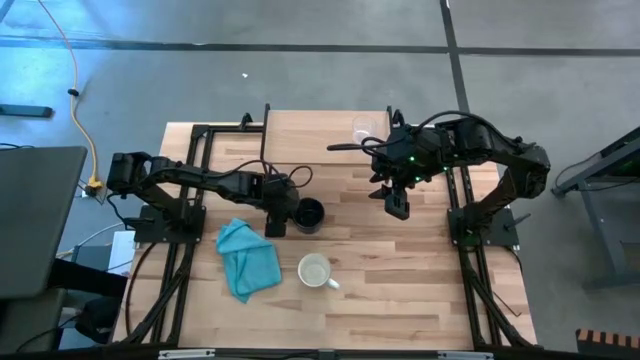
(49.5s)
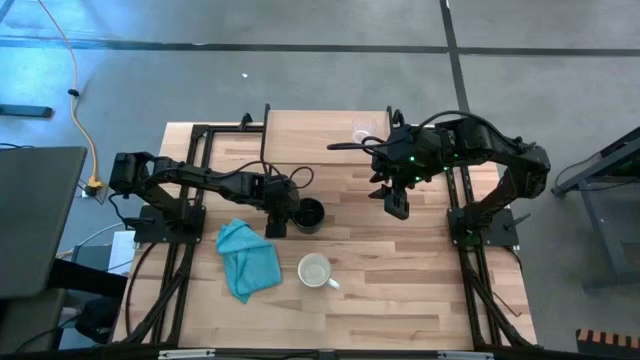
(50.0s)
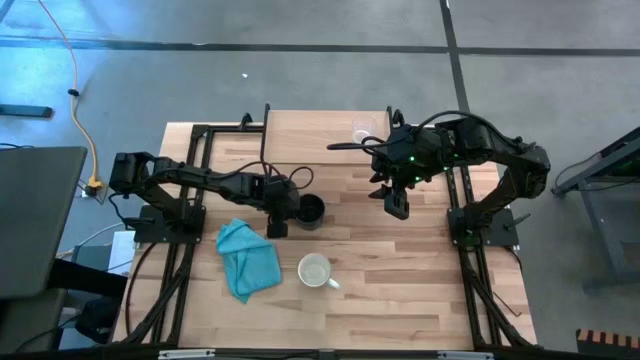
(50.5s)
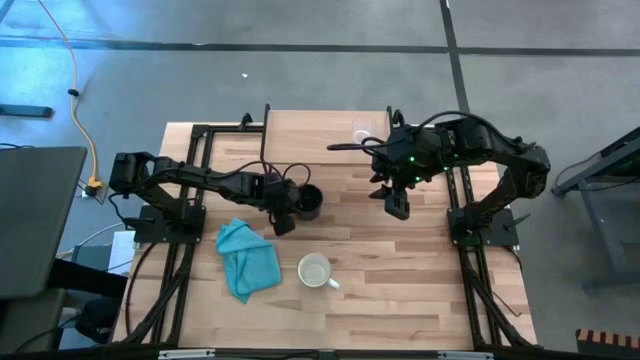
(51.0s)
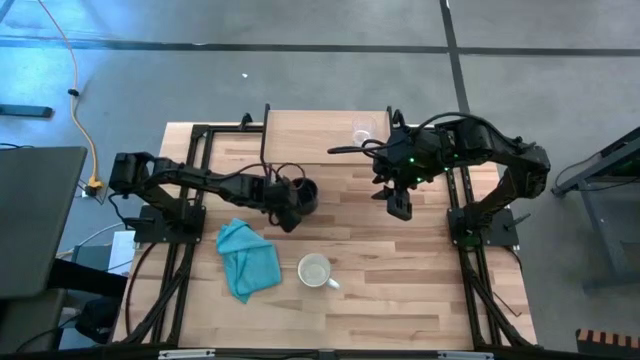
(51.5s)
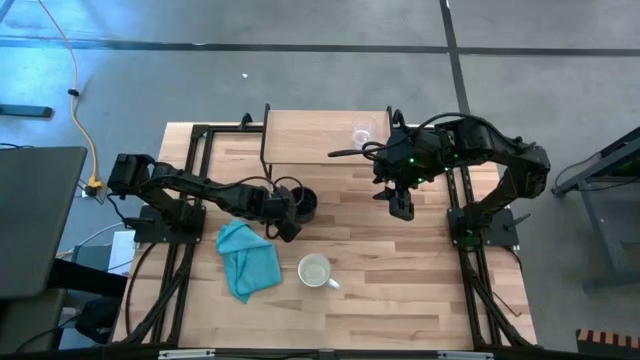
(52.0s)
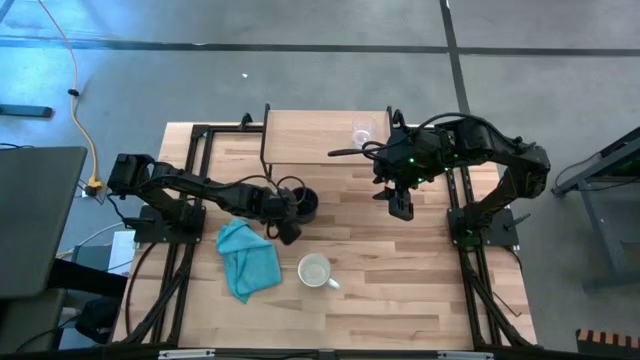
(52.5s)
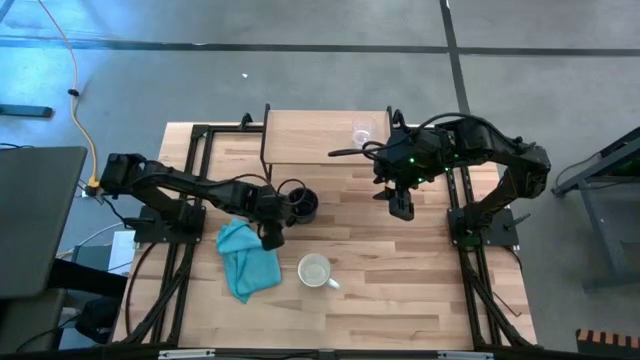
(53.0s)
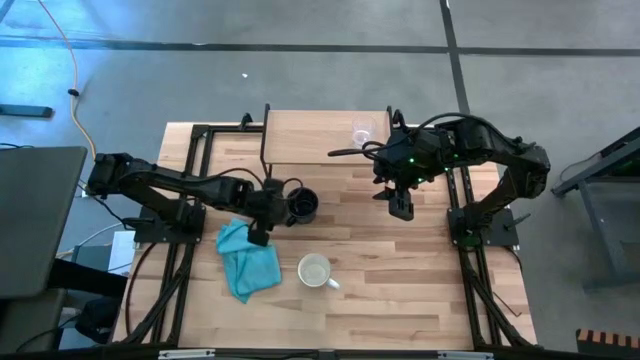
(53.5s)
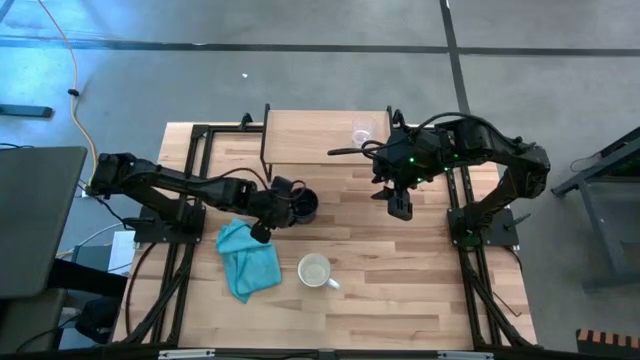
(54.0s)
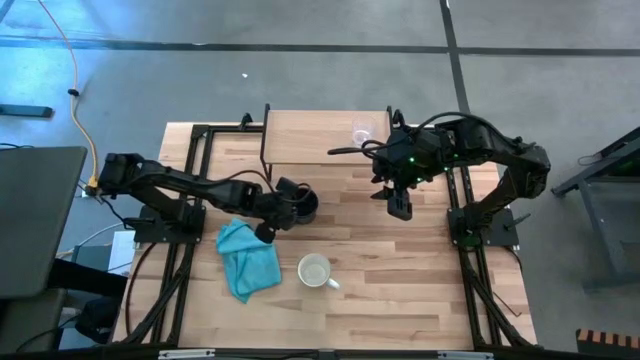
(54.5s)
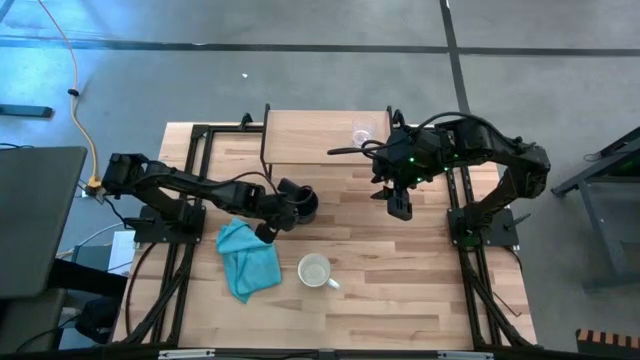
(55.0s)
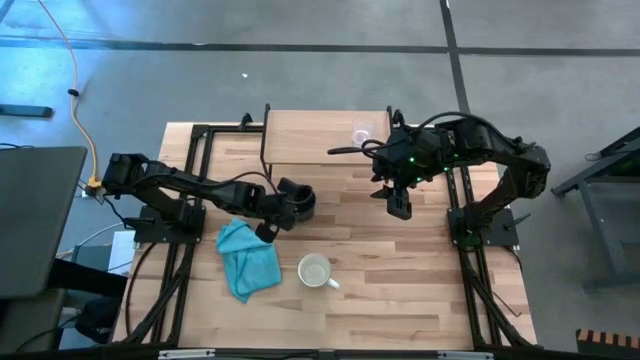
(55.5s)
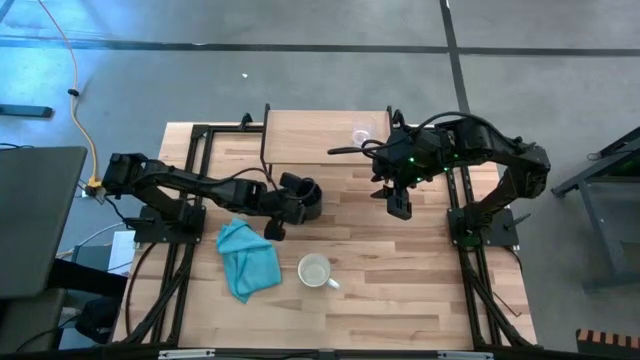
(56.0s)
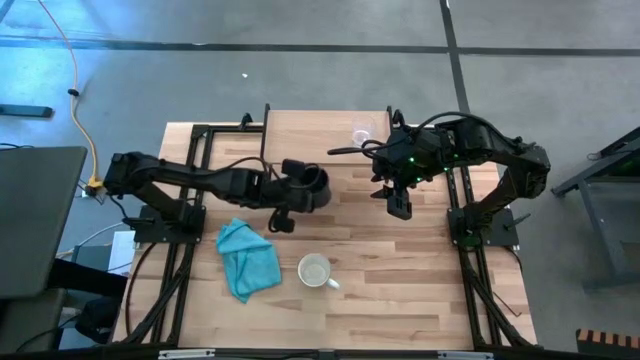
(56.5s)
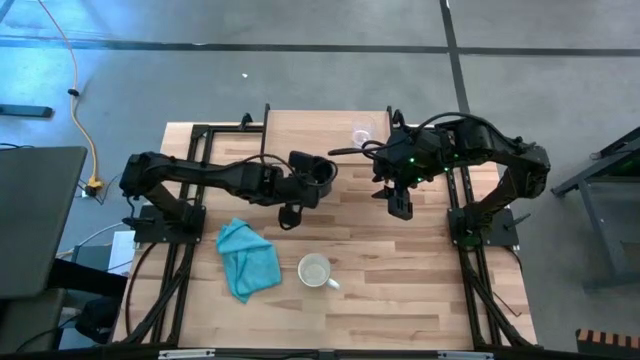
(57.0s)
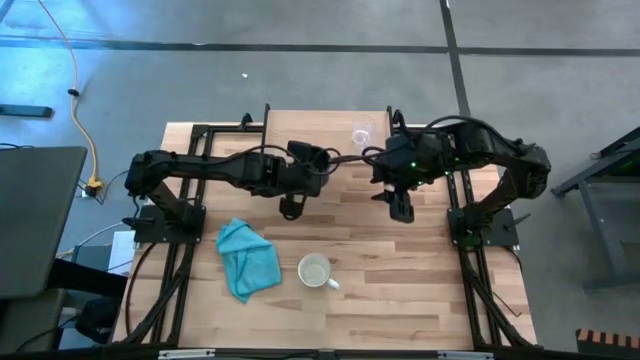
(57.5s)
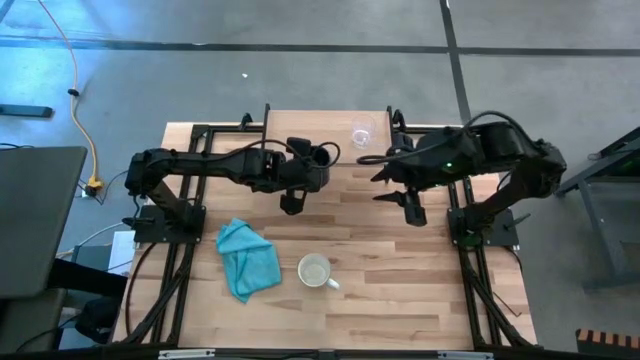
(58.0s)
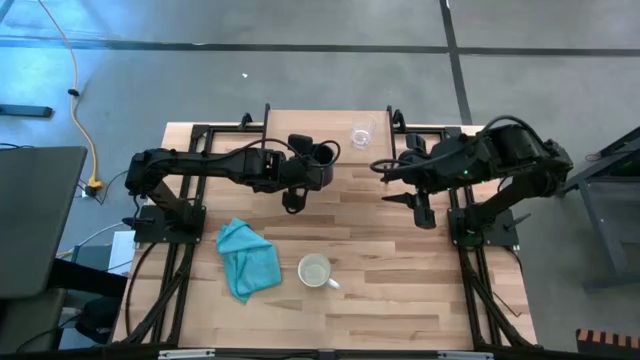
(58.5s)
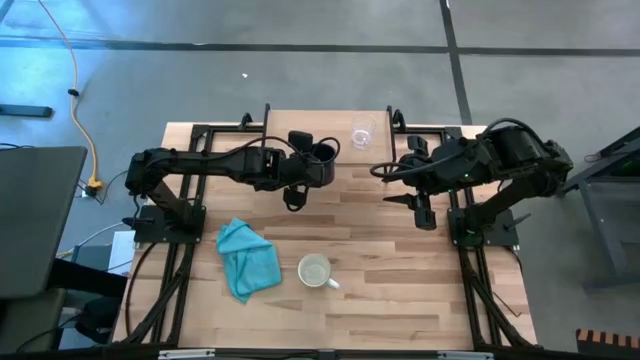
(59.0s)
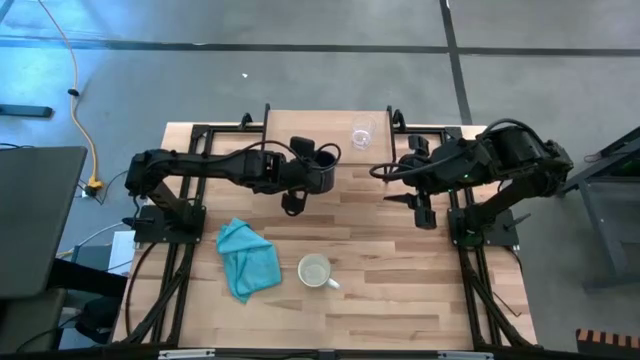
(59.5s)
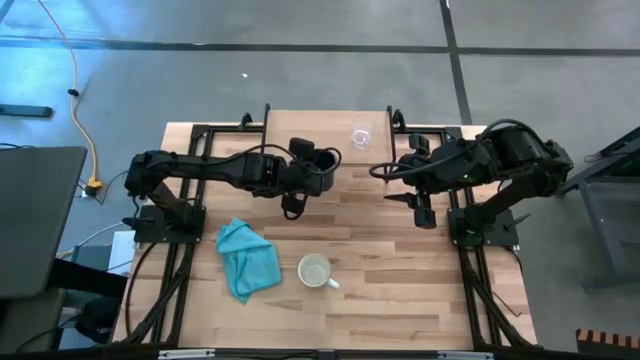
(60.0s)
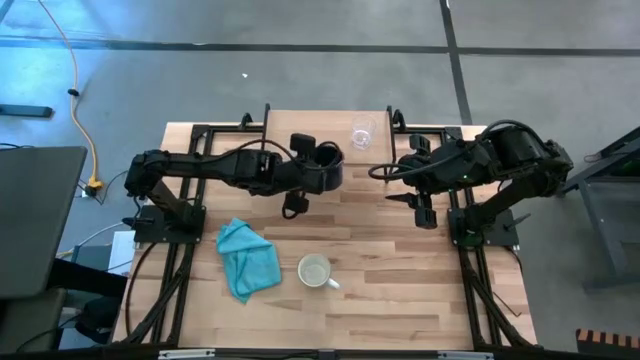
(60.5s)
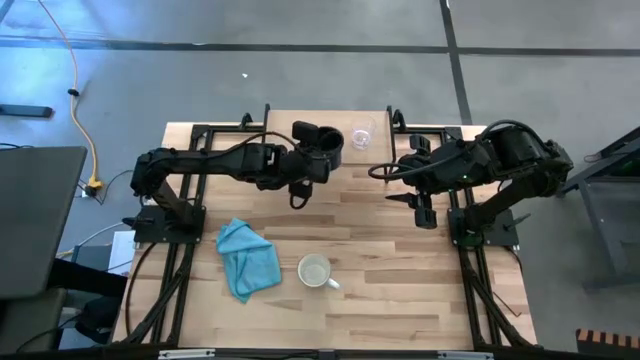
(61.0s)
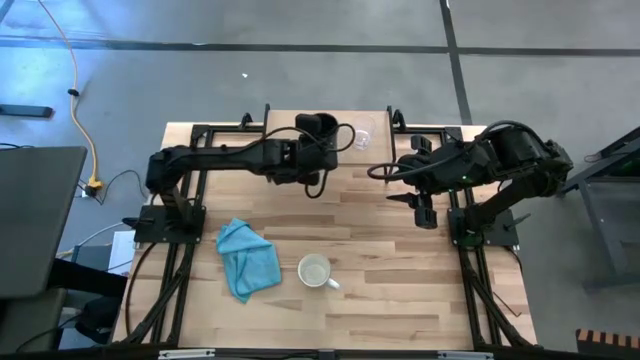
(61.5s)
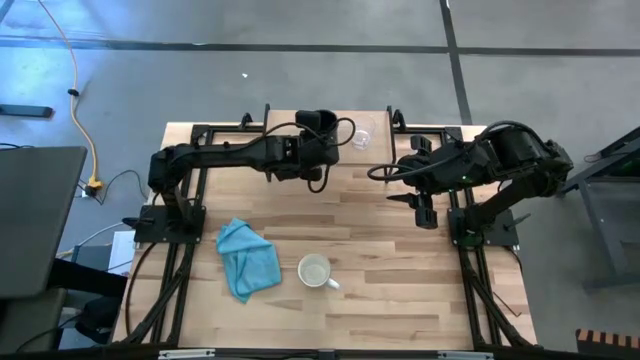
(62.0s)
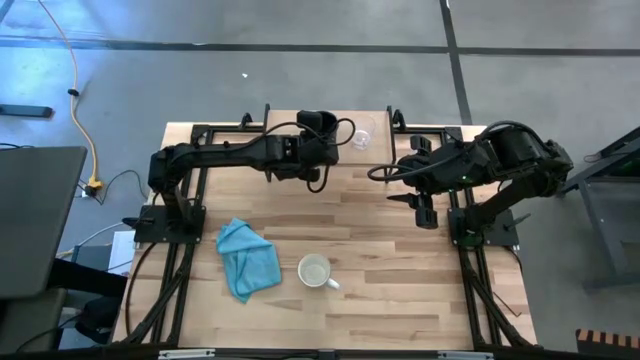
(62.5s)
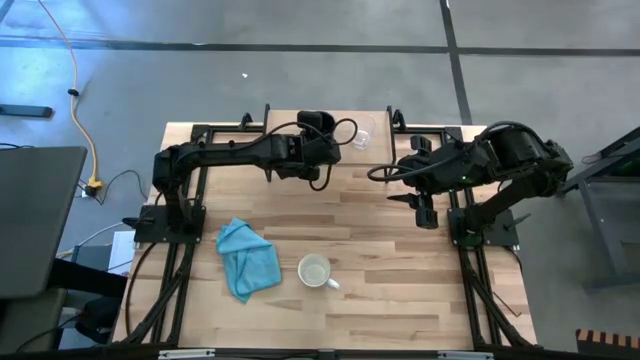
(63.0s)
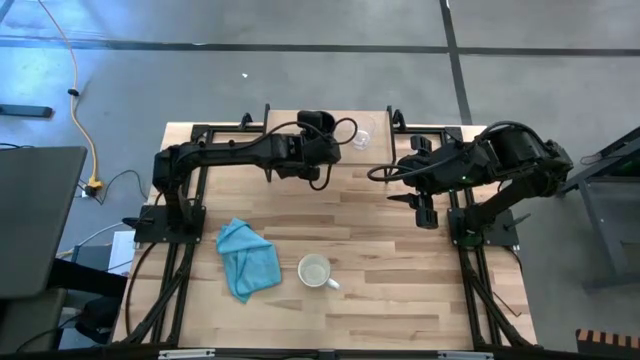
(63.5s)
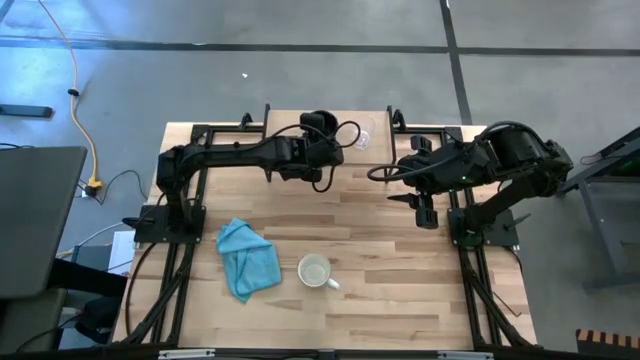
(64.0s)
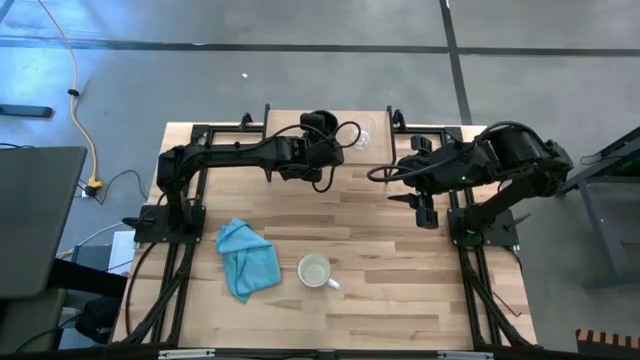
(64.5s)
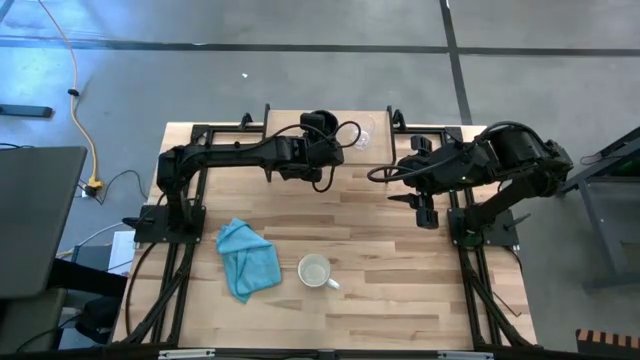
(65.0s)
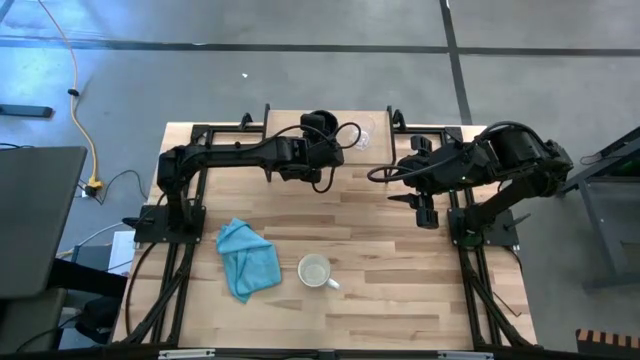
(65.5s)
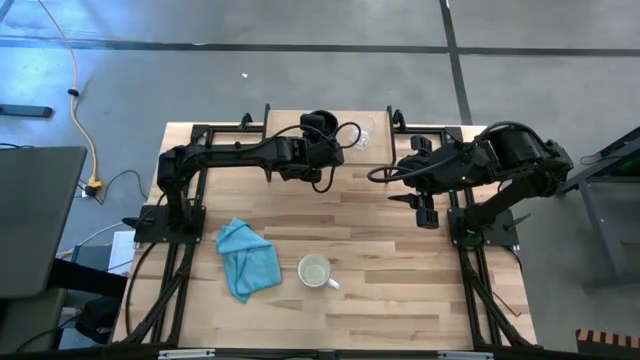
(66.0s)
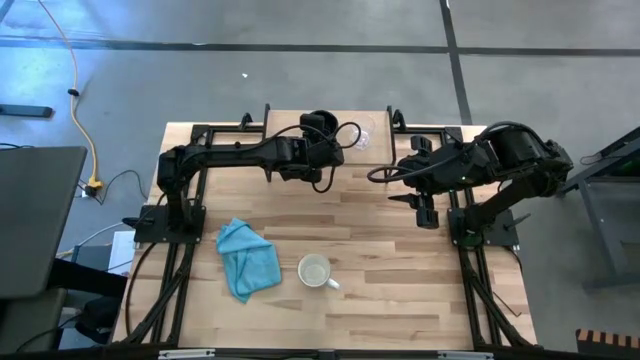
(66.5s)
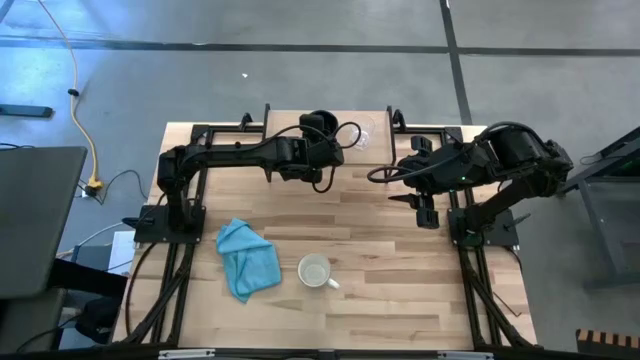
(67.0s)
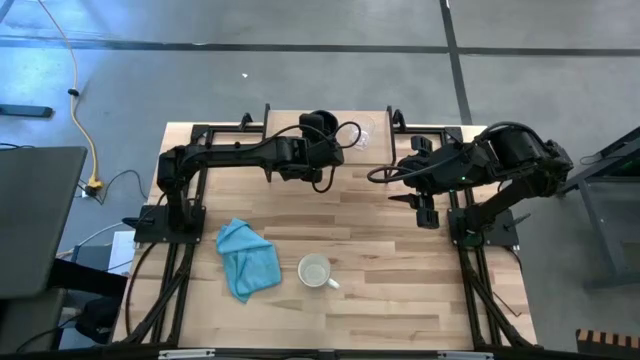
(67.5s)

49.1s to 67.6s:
Task: Stack small to large cups/mugs on shelf
Put the dark blue mug on the shelf

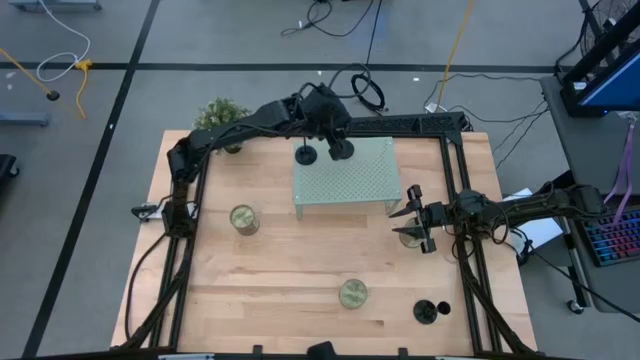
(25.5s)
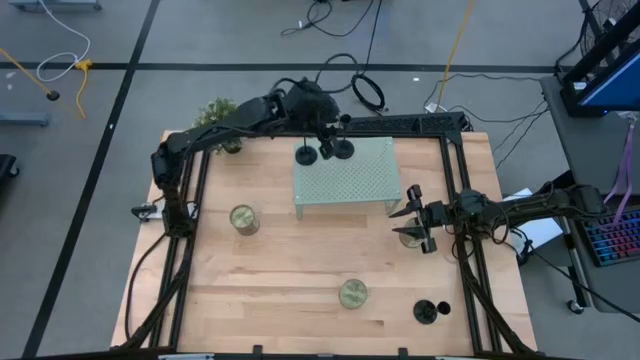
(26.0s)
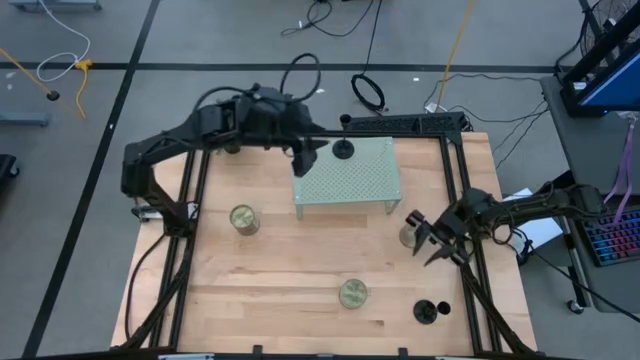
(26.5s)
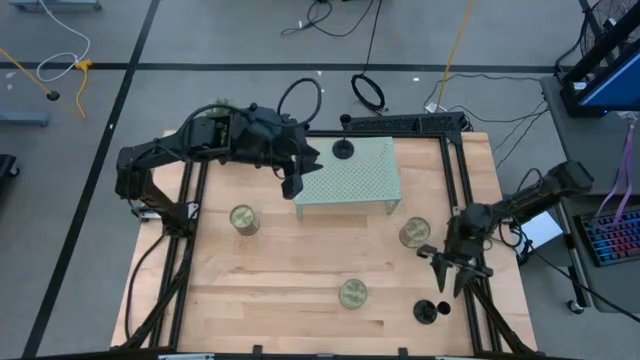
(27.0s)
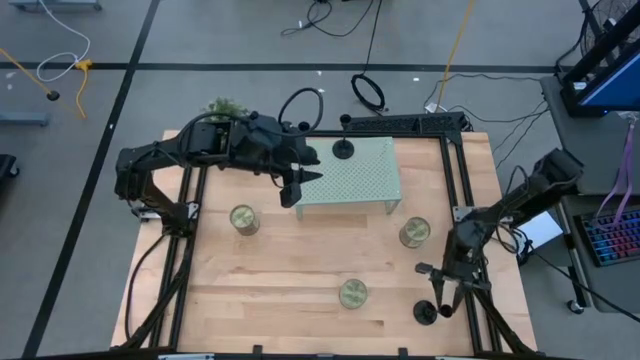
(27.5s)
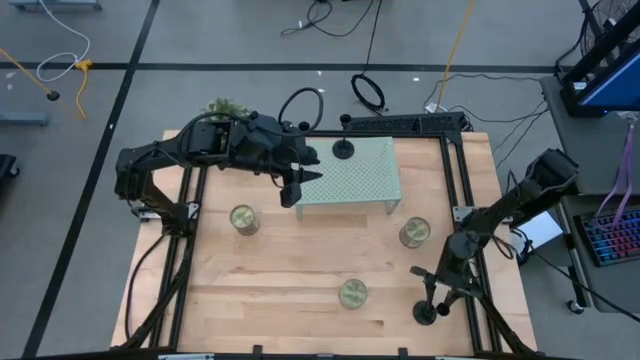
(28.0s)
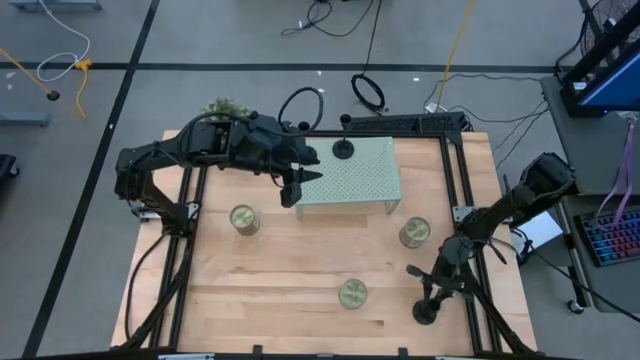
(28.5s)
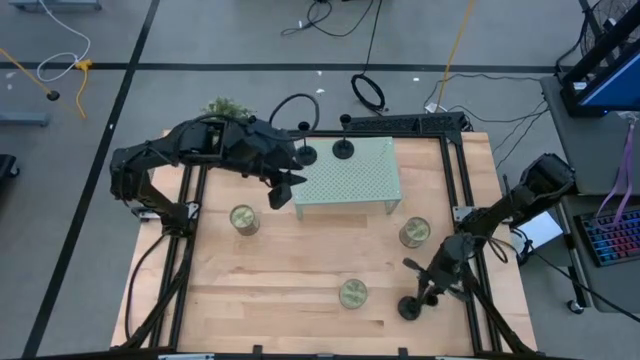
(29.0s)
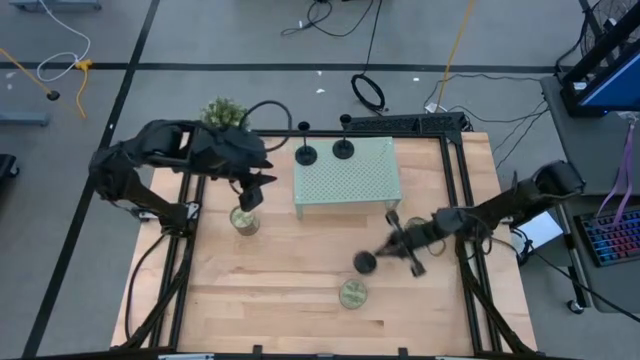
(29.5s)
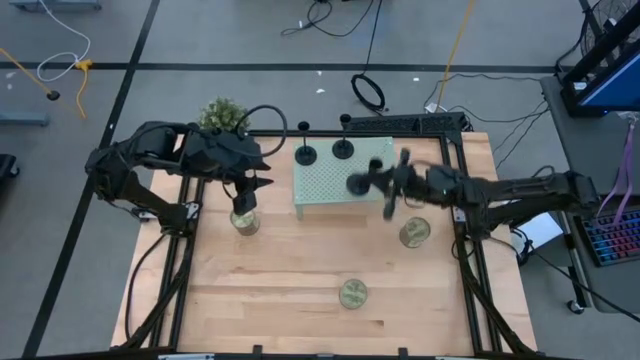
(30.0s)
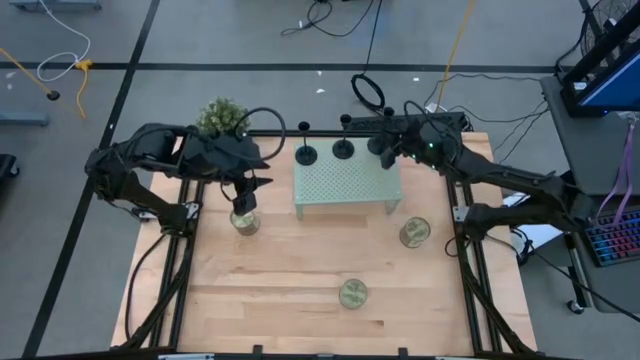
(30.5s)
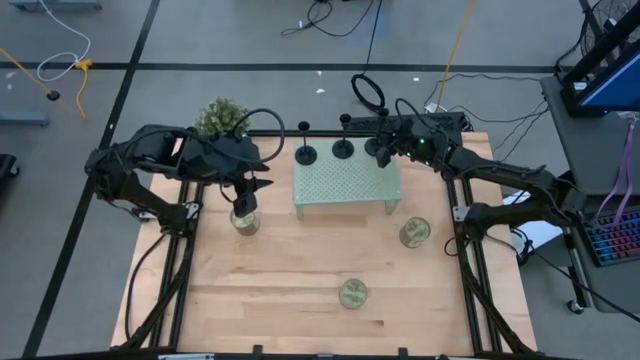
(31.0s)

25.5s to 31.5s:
Task: Pick & Place candle stick holders
Align the black candle holder with the black candle holders on the shelf
